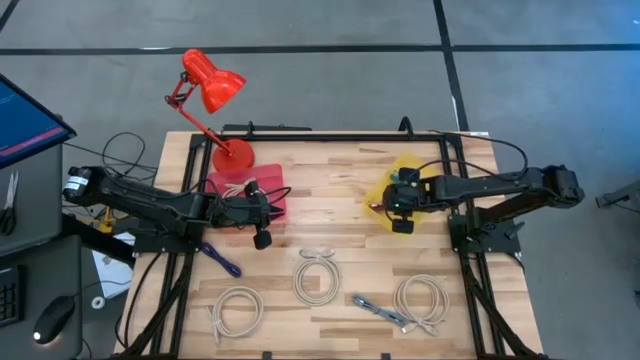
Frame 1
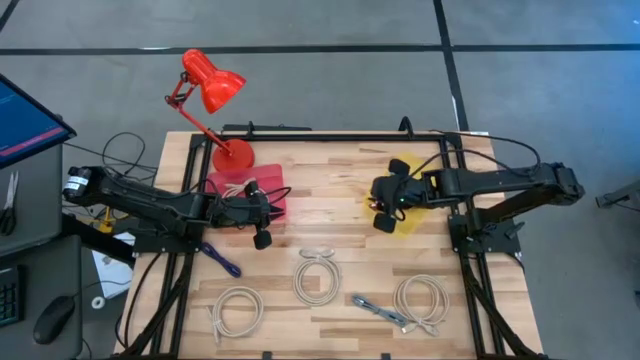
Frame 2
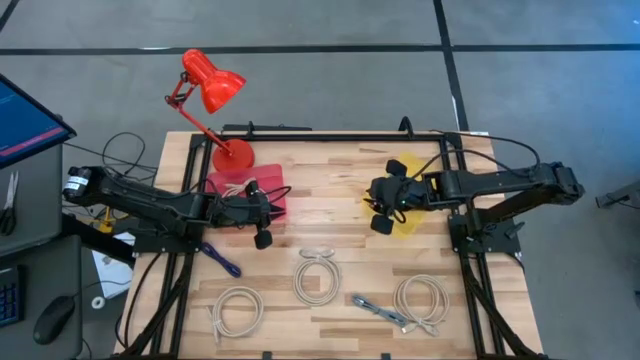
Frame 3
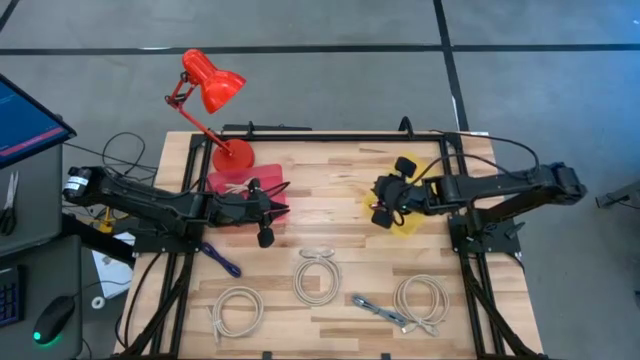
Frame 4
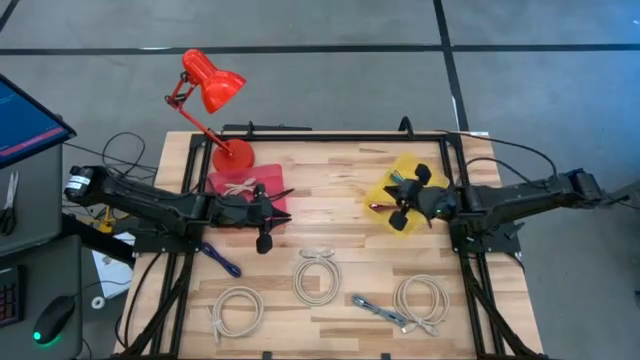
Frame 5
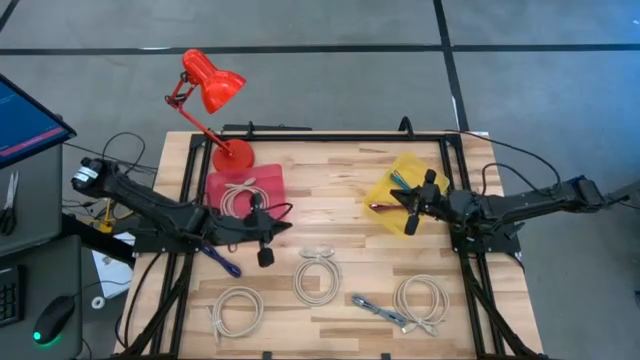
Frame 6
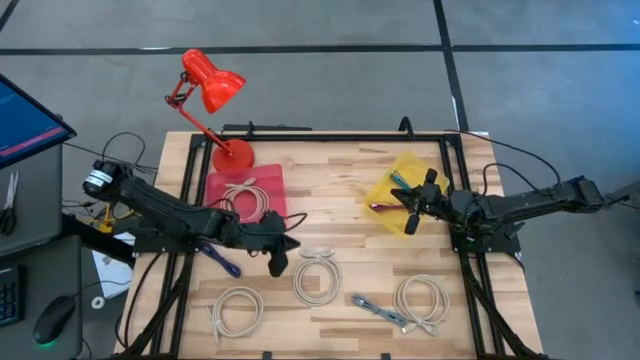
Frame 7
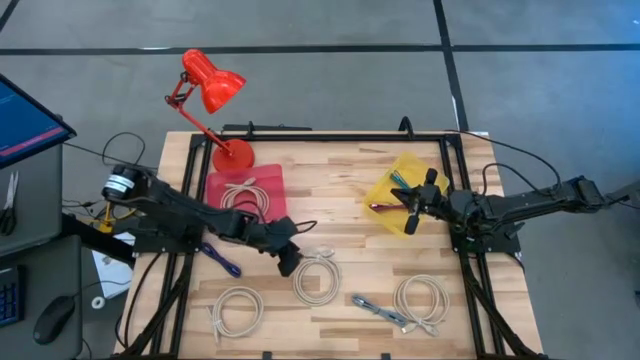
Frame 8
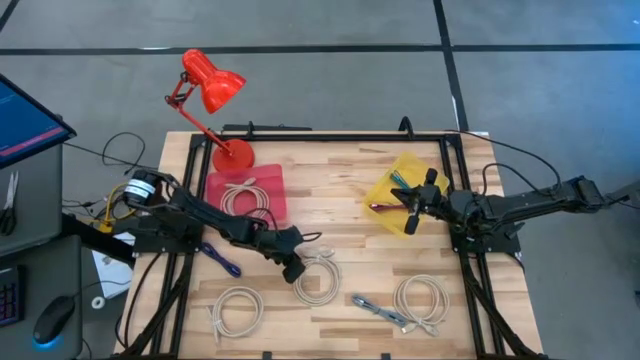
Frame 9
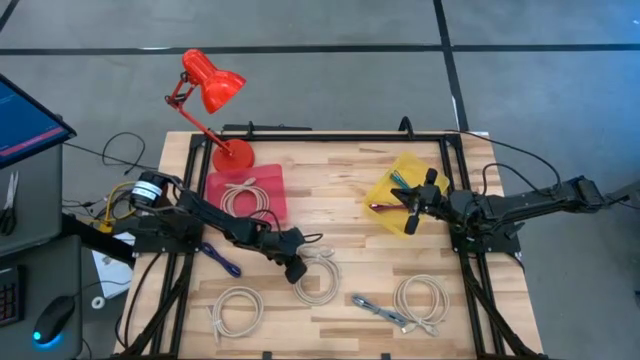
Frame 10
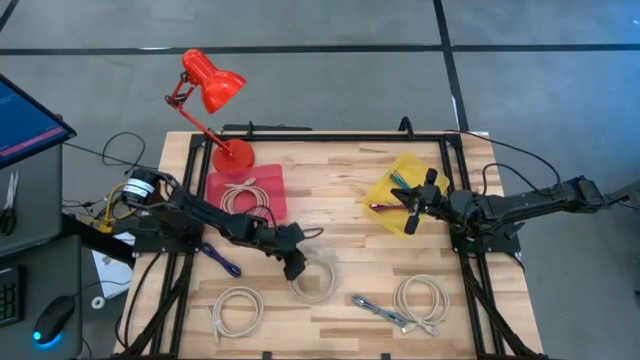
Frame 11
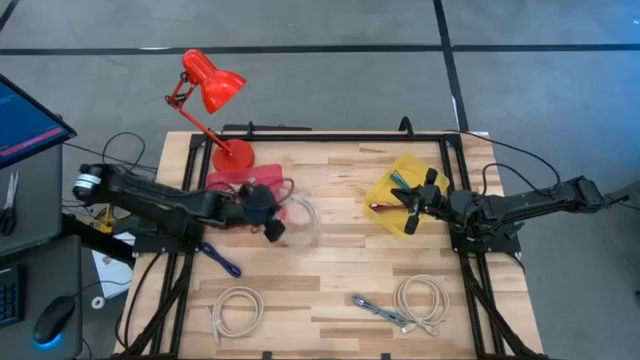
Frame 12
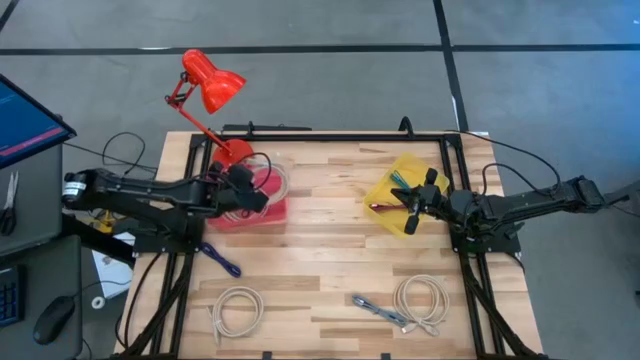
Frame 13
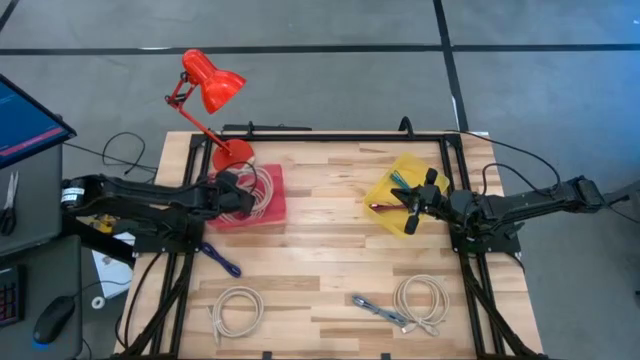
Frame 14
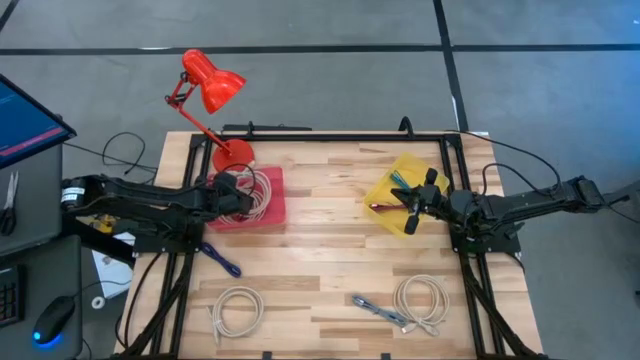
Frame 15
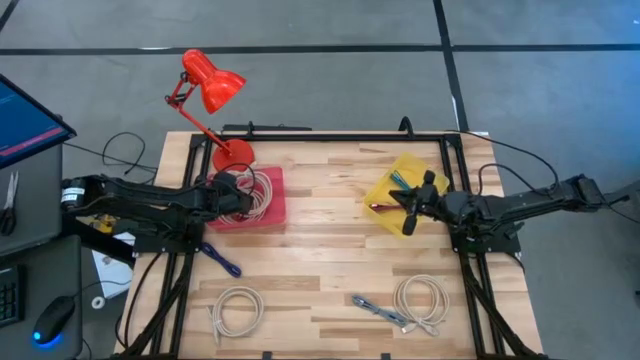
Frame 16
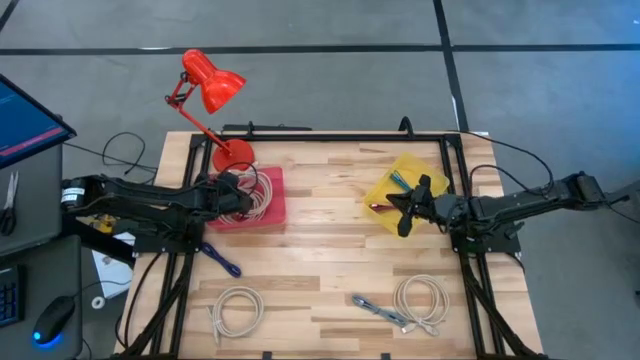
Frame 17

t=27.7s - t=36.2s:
Task: Pick & Place USB Port
Put the brown USB cable into the pink bin

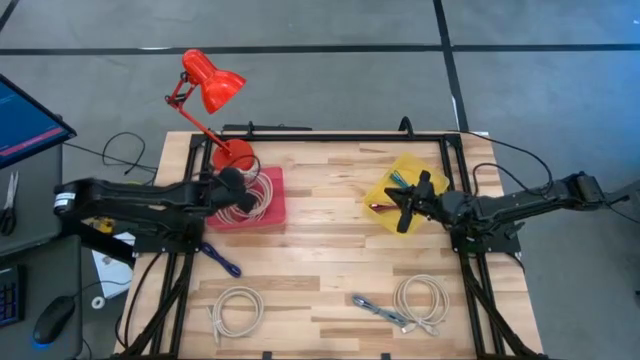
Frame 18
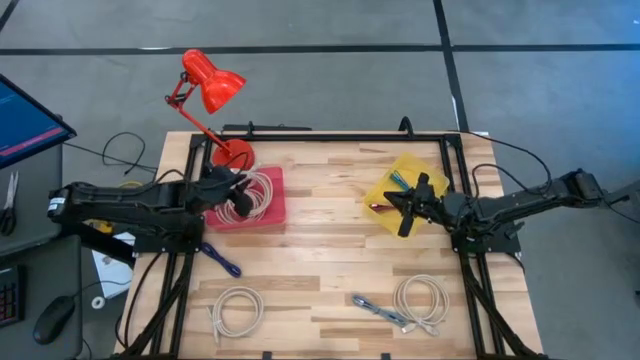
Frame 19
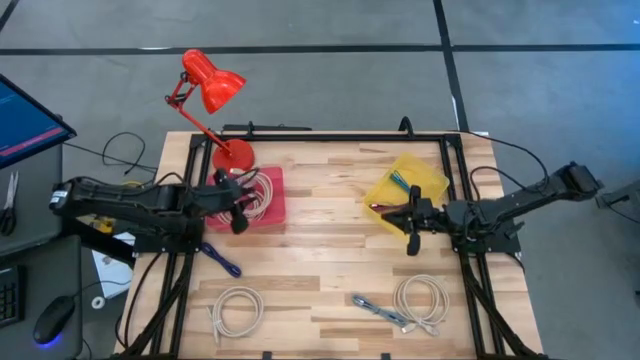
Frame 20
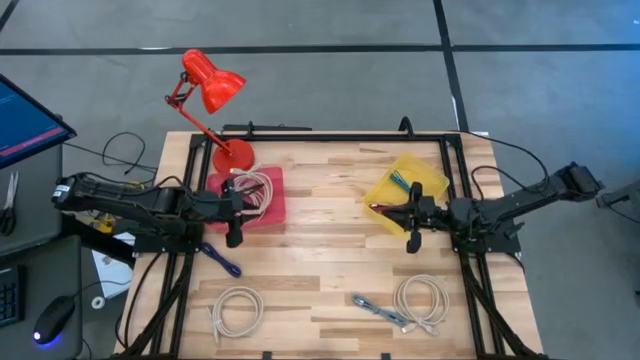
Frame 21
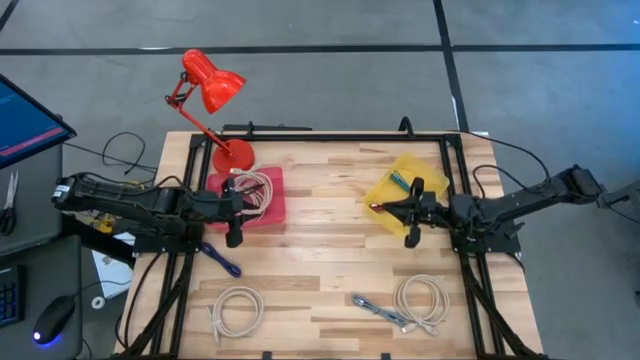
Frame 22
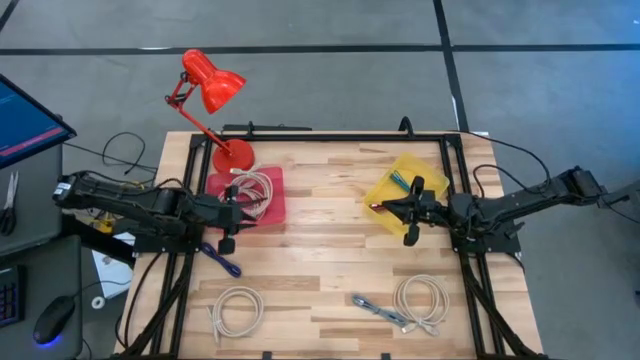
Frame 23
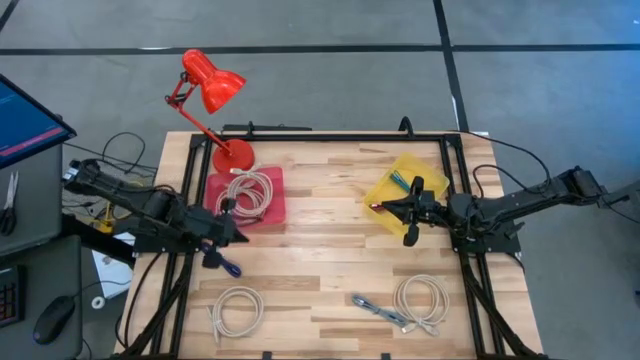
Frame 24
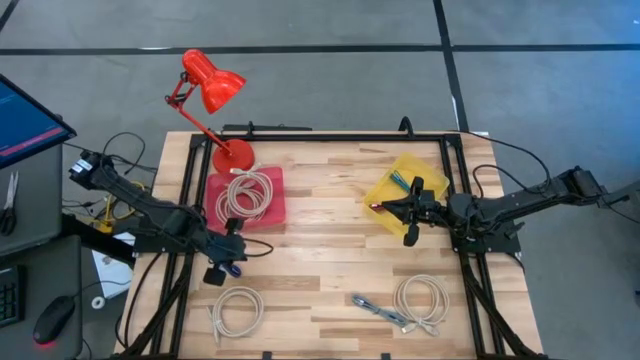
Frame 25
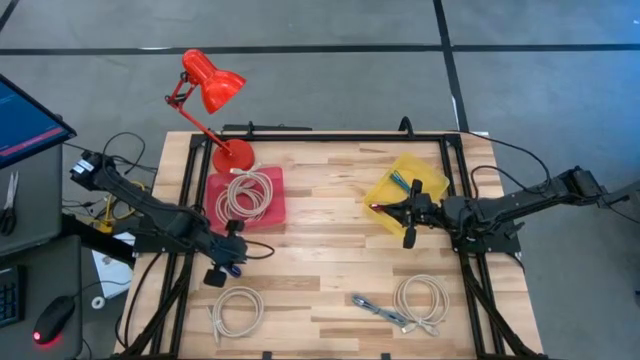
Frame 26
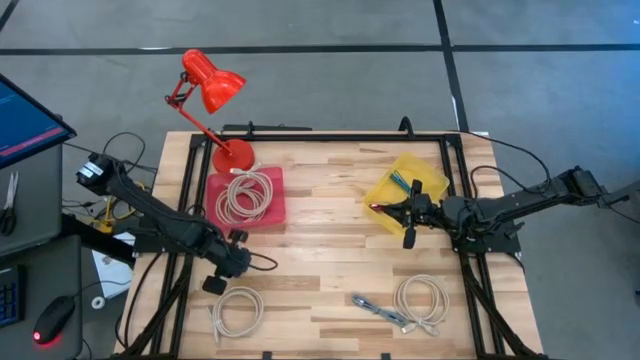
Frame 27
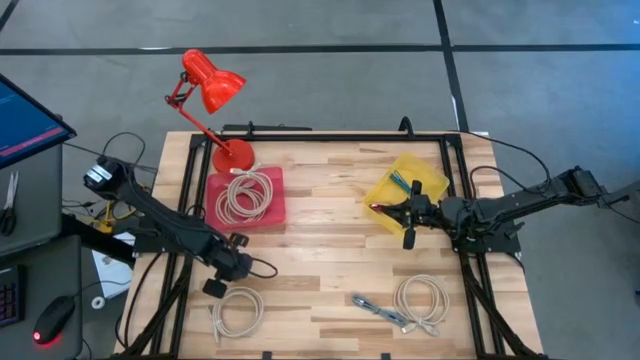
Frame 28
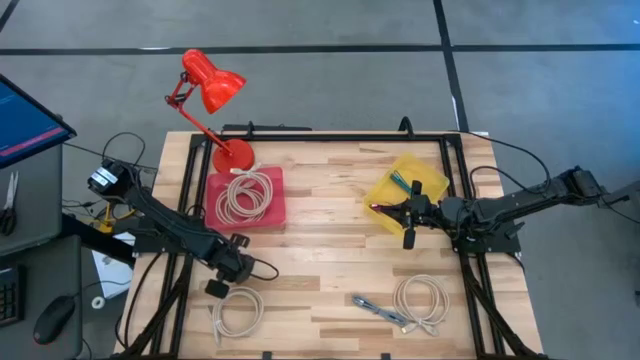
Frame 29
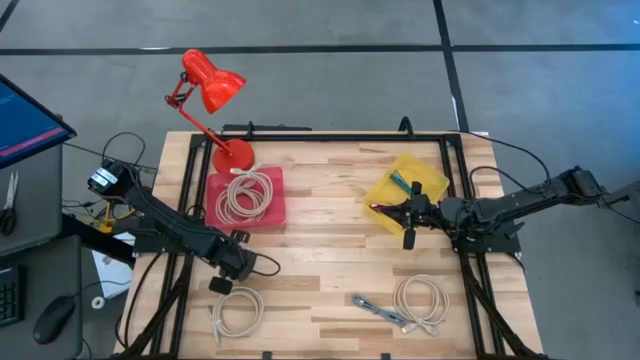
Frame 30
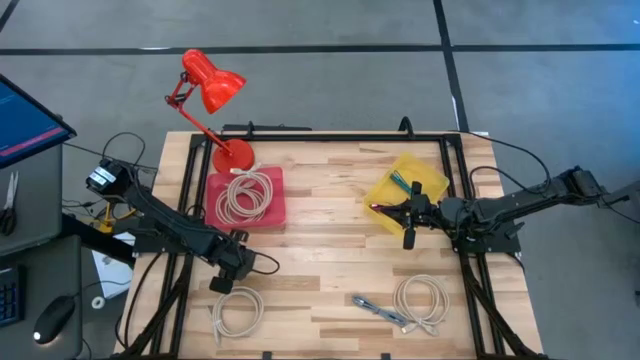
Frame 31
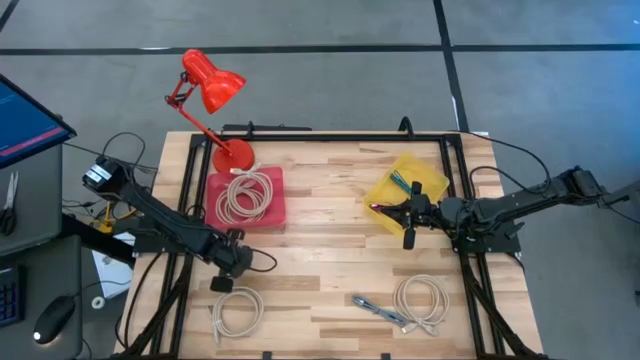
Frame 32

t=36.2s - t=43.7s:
Put the purple USB cable into the yellow bin

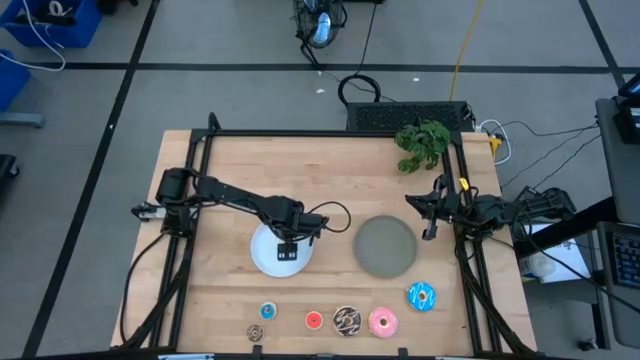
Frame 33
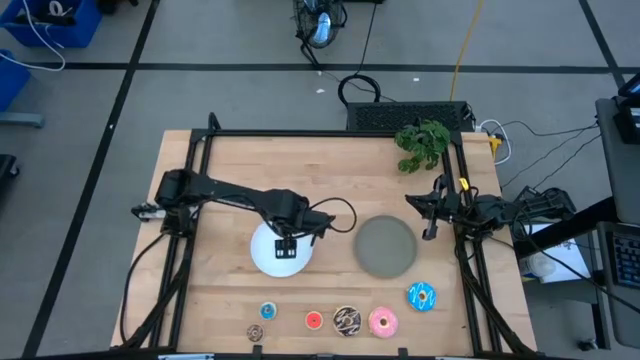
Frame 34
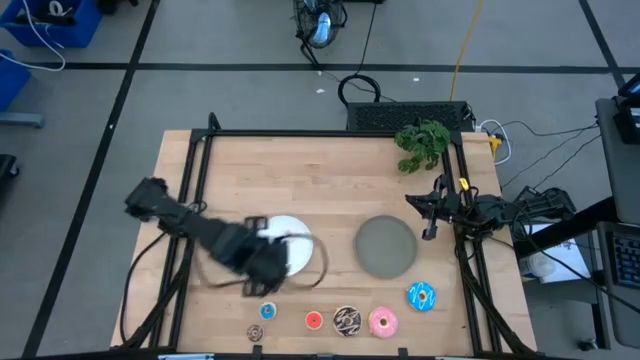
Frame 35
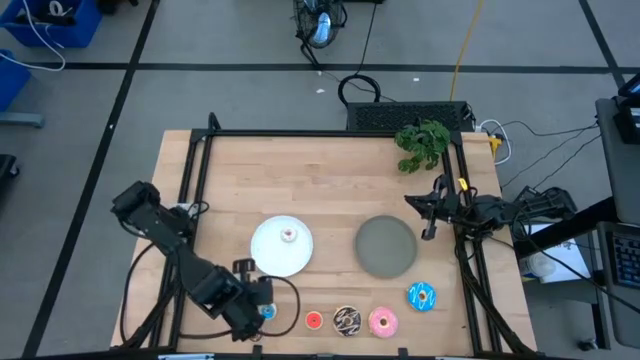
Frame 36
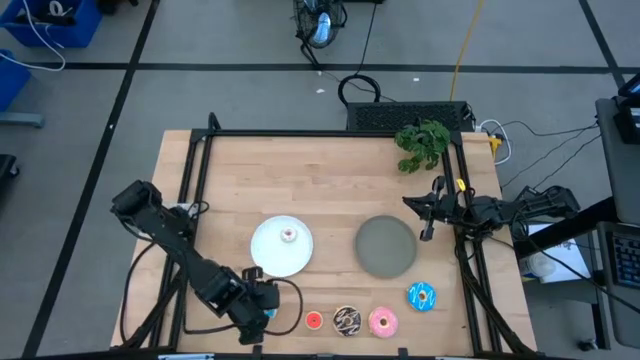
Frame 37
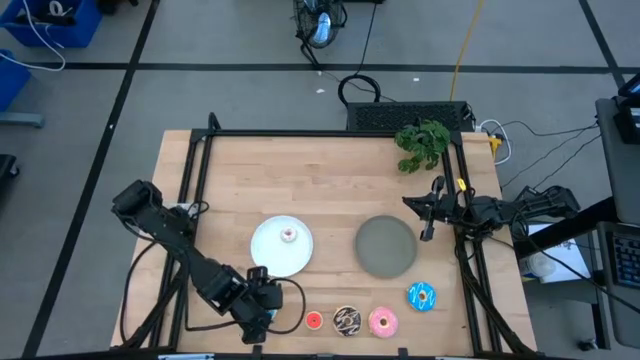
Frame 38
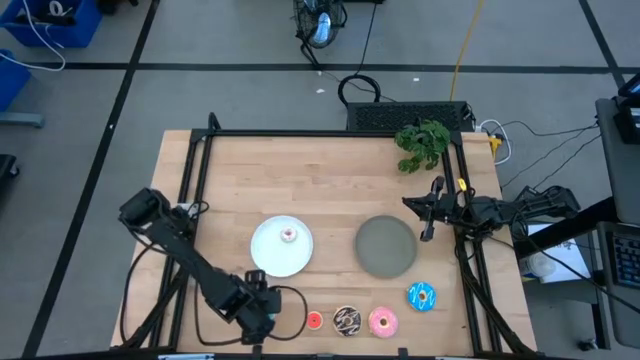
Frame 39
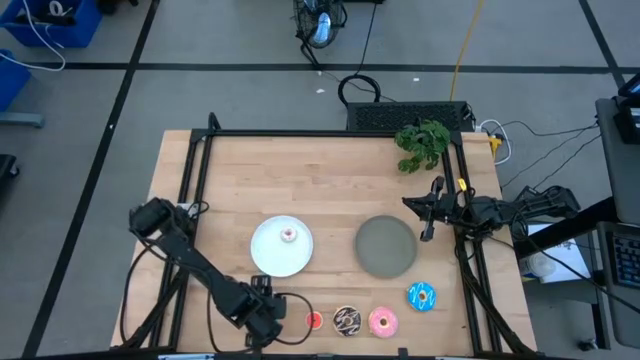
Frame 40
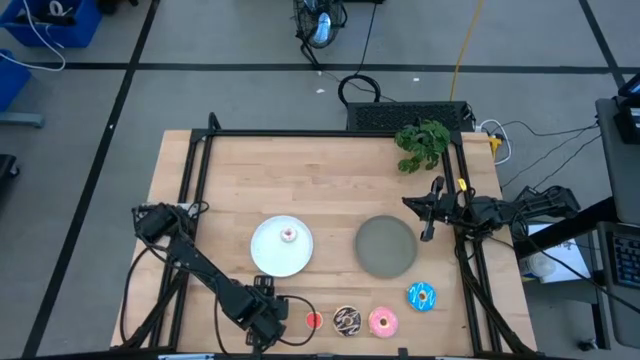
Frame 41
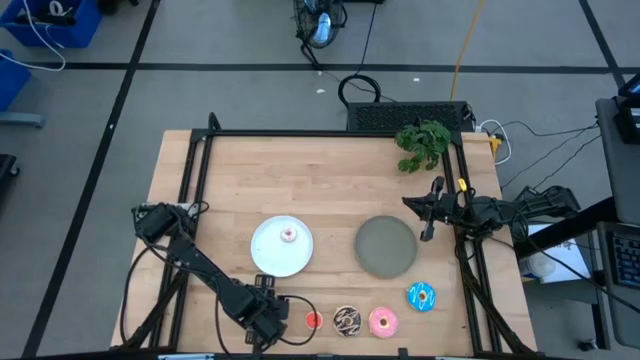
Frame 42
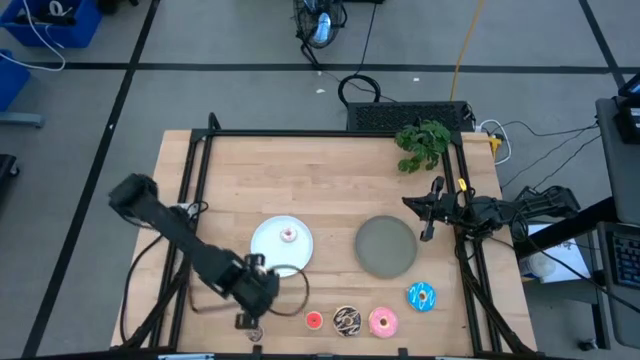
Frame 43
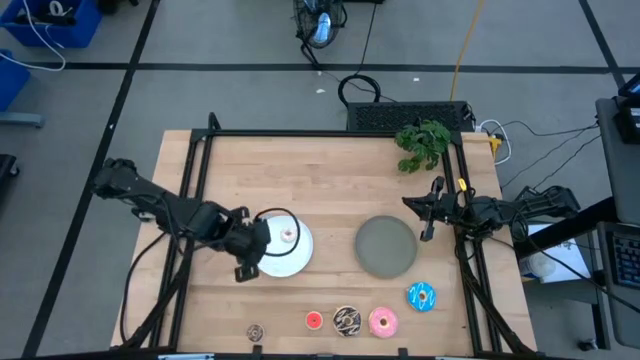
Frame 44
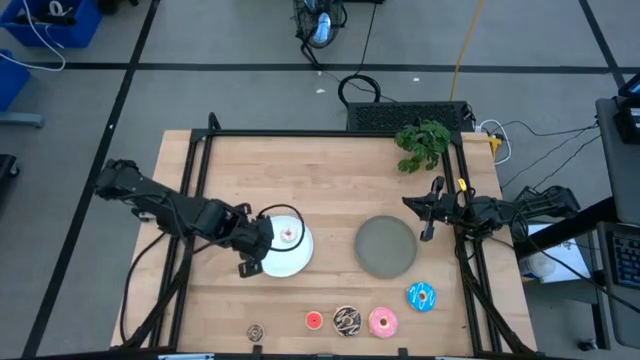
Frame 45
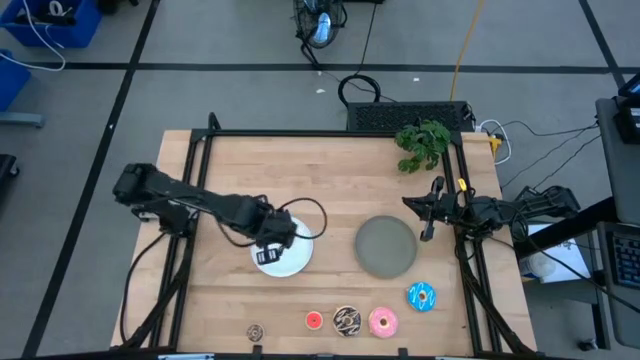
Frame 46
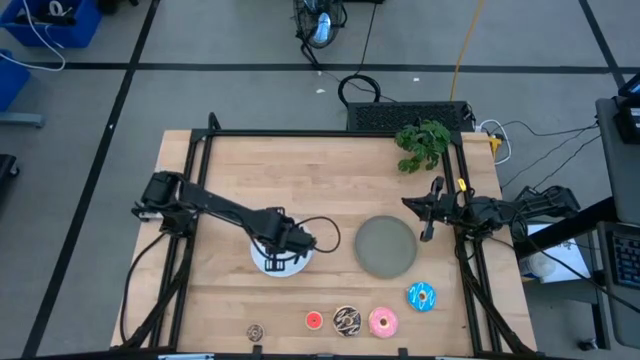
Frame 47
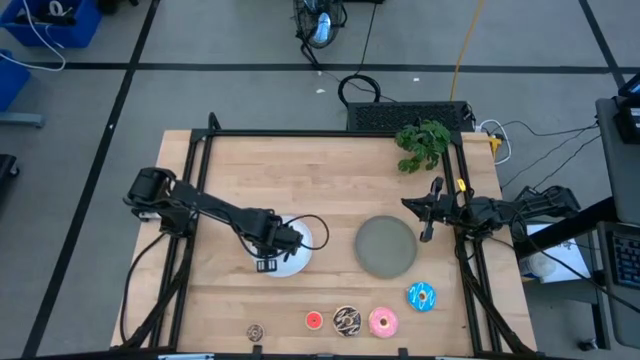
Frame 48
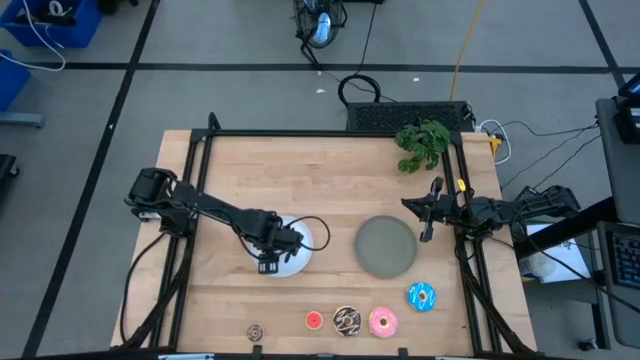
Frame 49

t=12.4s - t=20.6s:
Task: Pick & Place donuts
Put the small blue donut on the white plate
